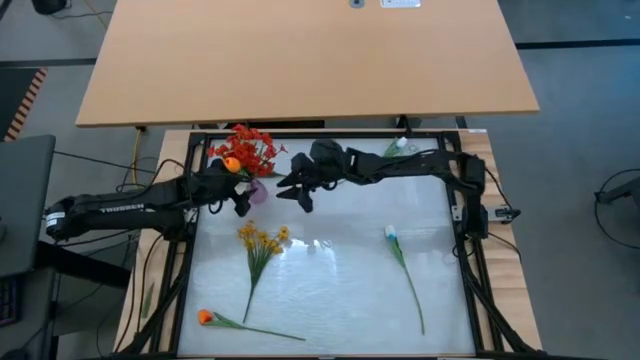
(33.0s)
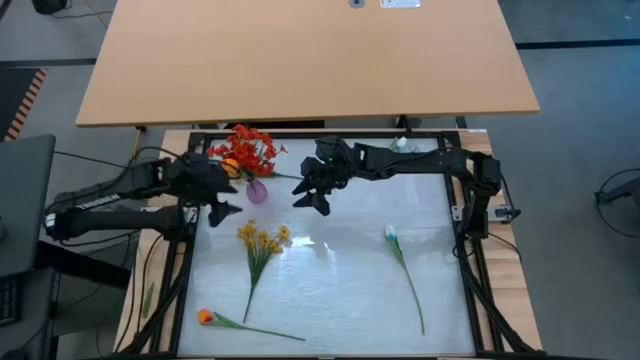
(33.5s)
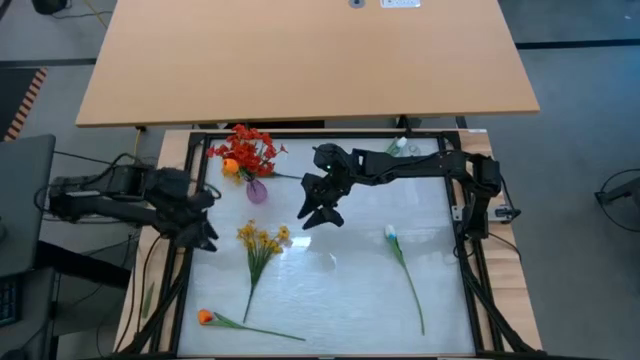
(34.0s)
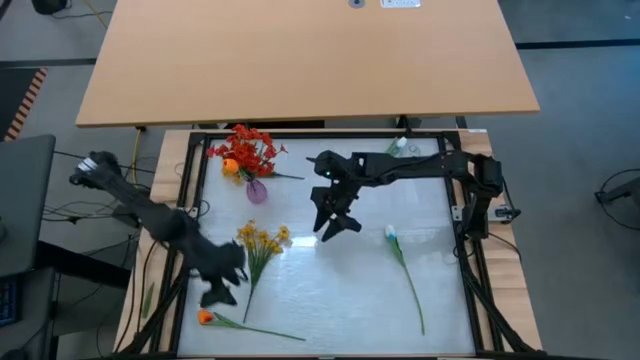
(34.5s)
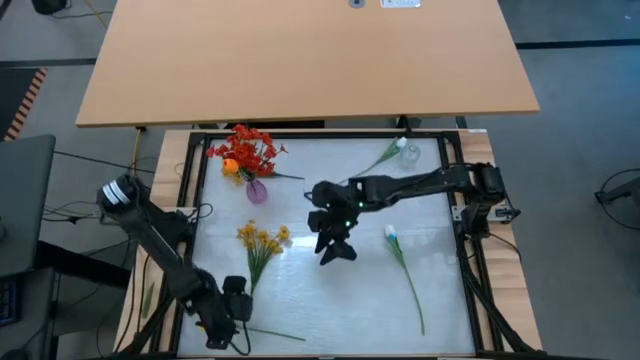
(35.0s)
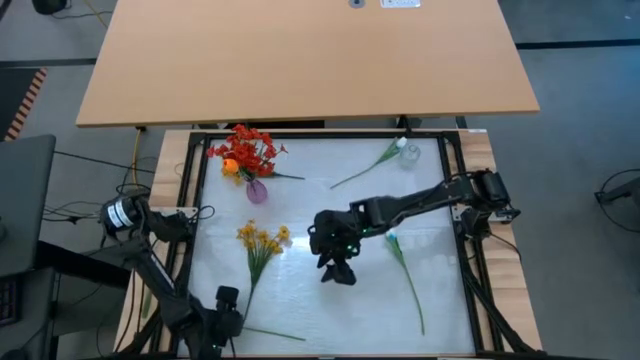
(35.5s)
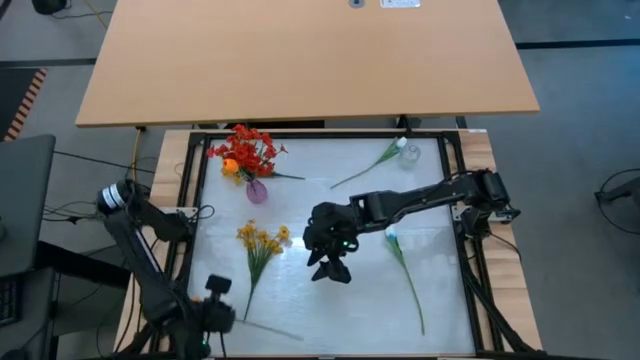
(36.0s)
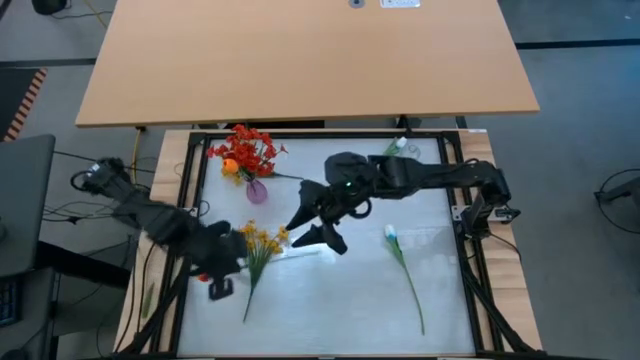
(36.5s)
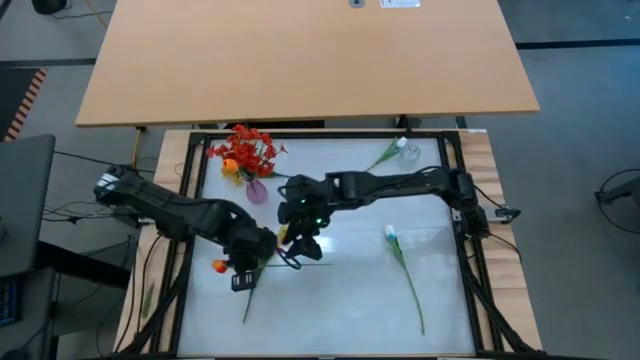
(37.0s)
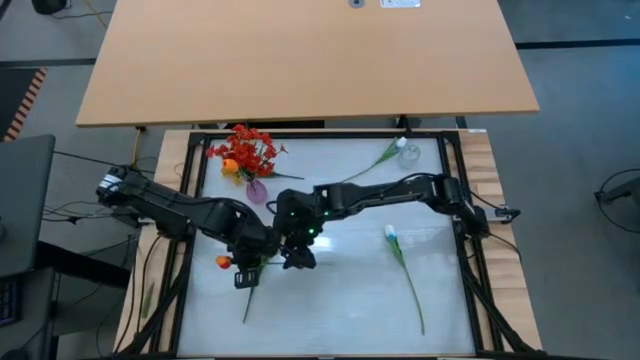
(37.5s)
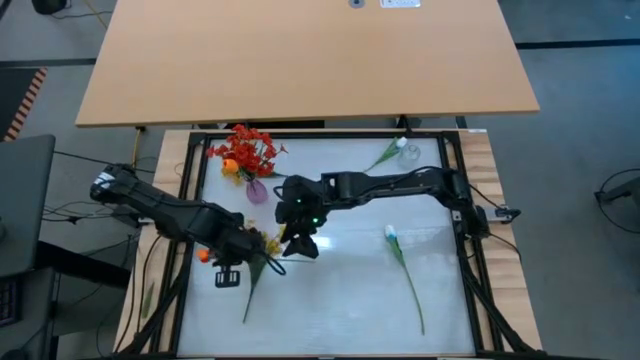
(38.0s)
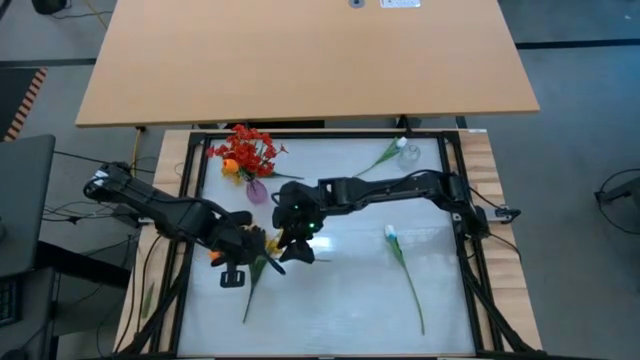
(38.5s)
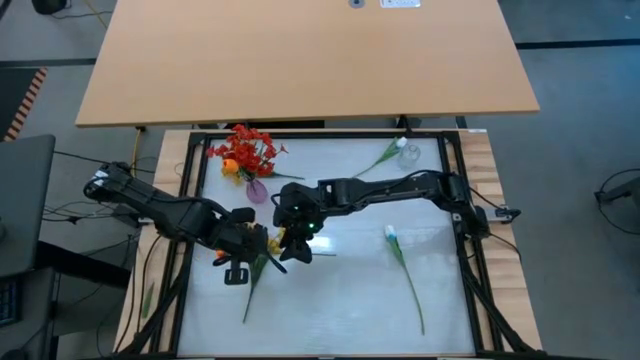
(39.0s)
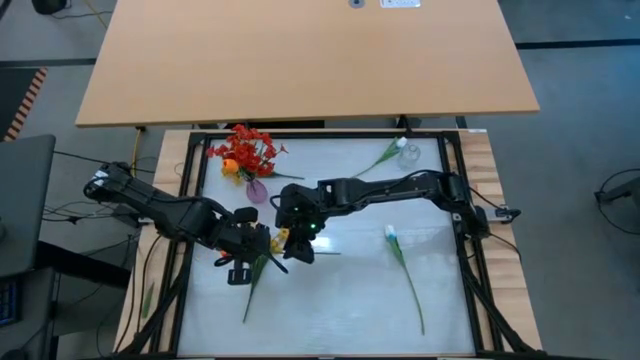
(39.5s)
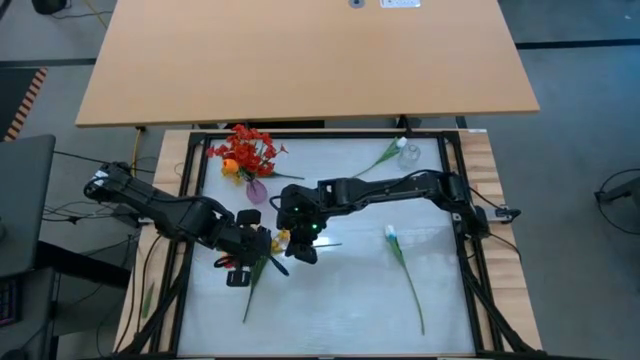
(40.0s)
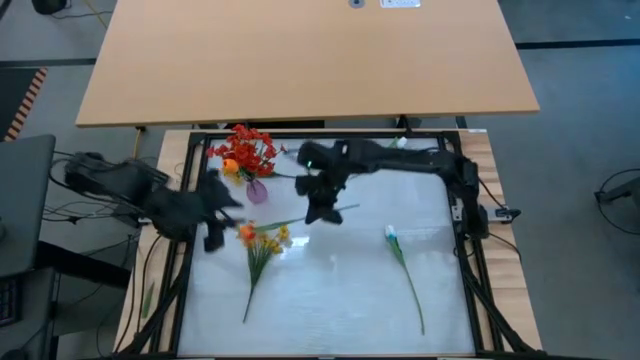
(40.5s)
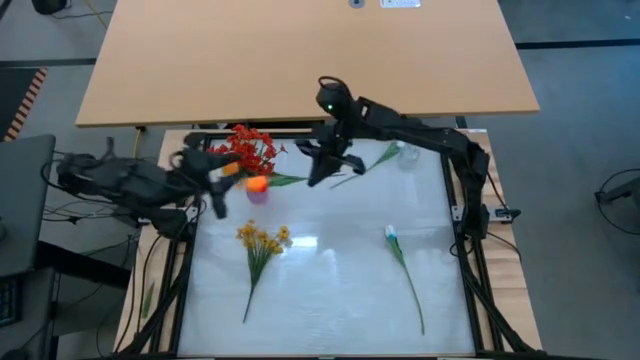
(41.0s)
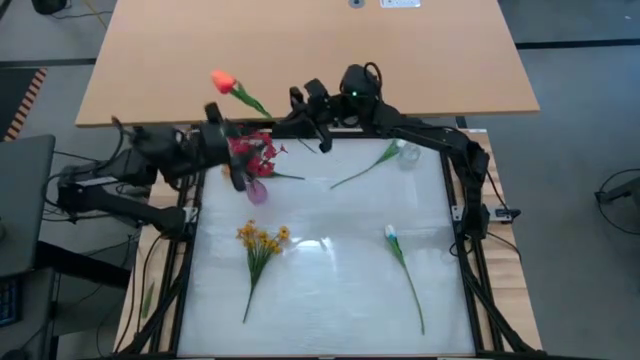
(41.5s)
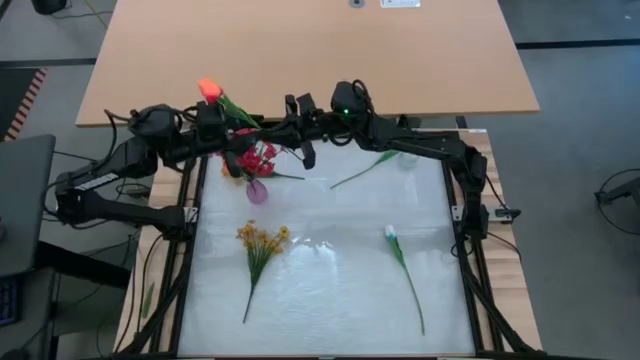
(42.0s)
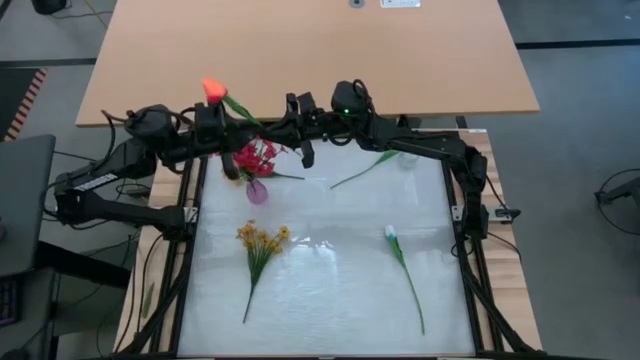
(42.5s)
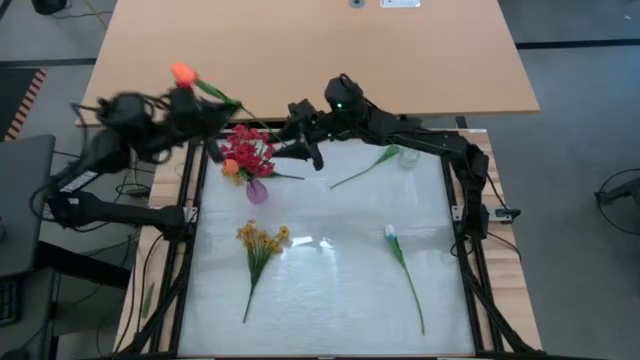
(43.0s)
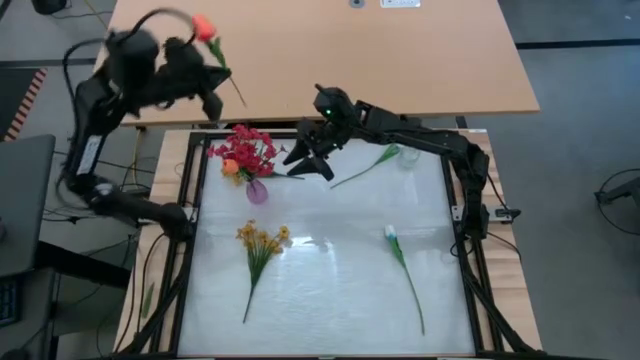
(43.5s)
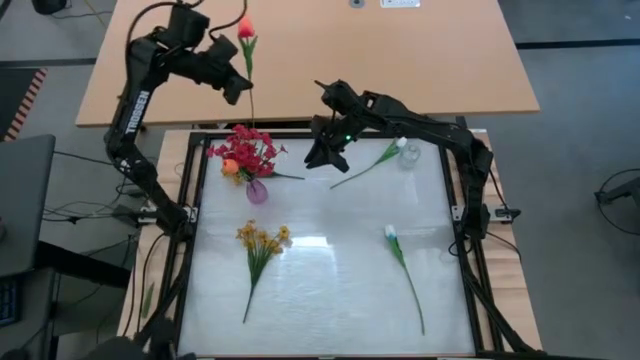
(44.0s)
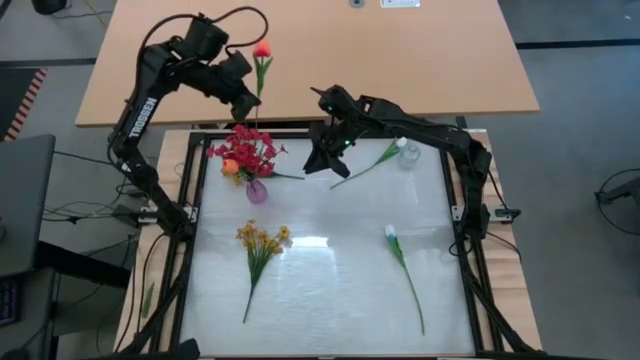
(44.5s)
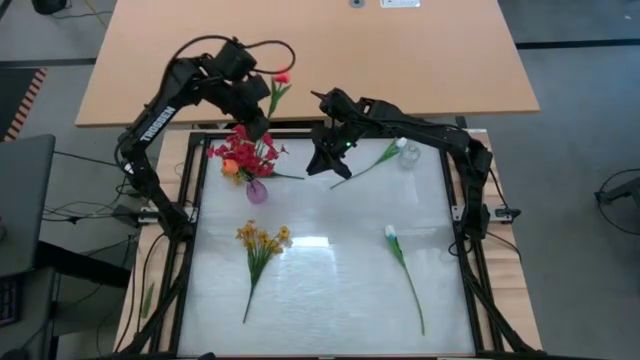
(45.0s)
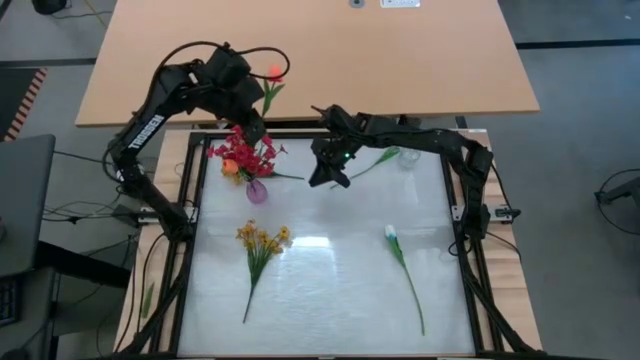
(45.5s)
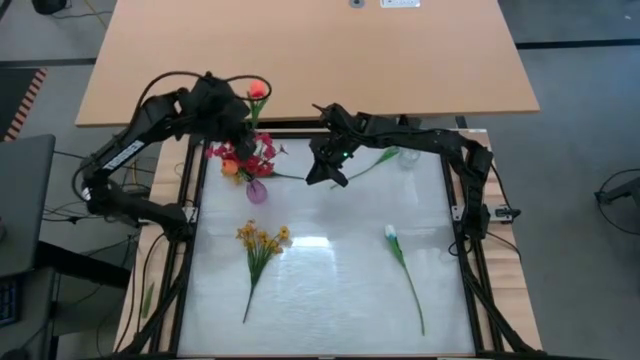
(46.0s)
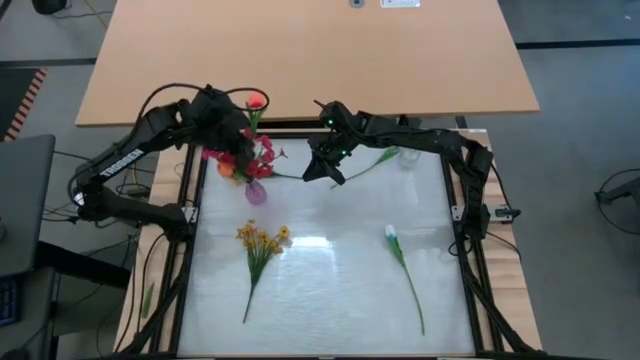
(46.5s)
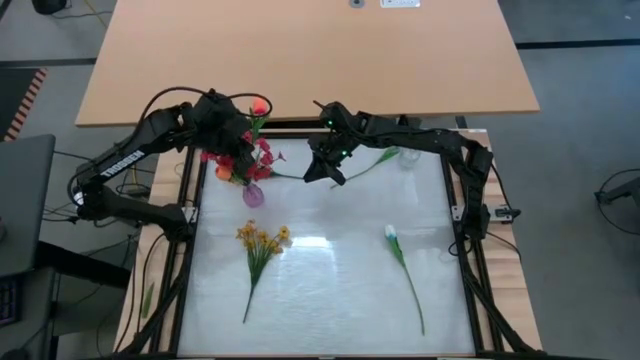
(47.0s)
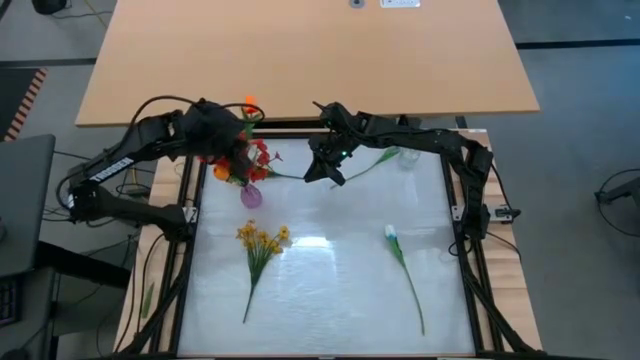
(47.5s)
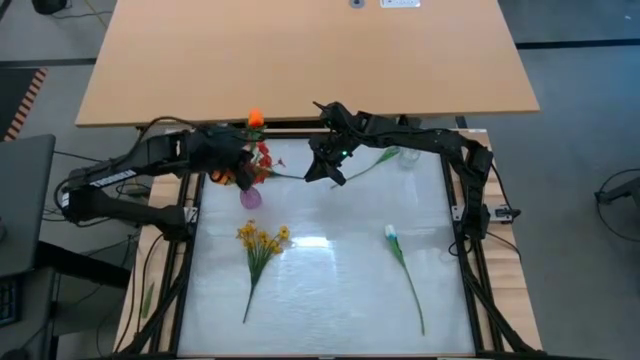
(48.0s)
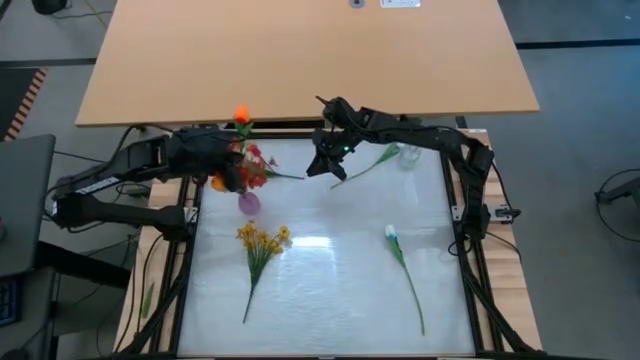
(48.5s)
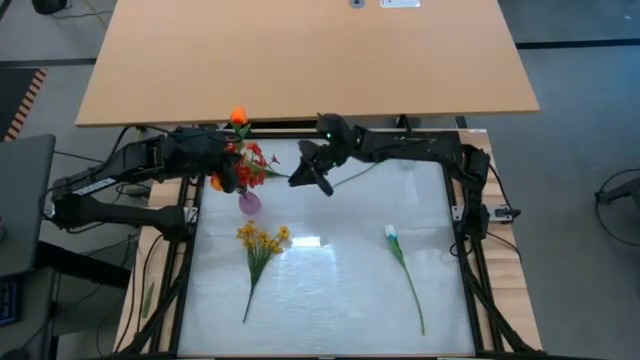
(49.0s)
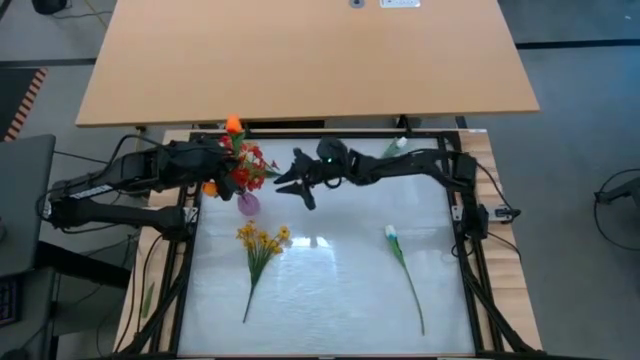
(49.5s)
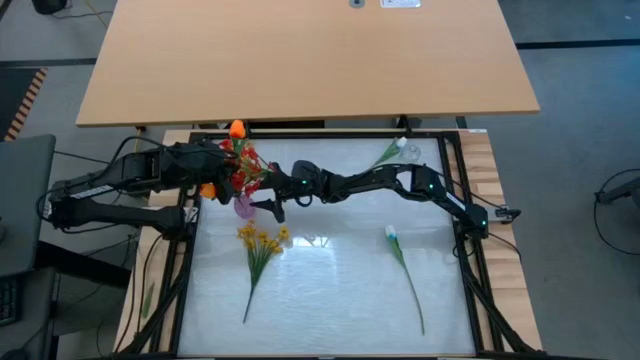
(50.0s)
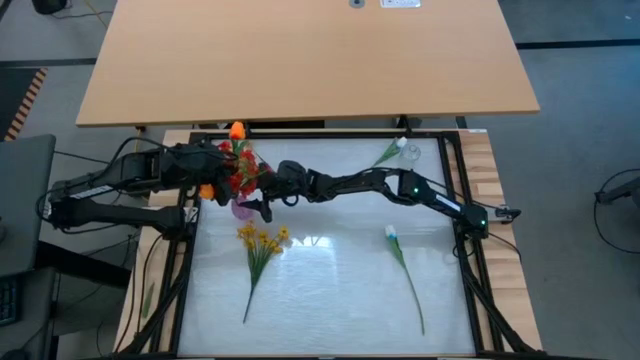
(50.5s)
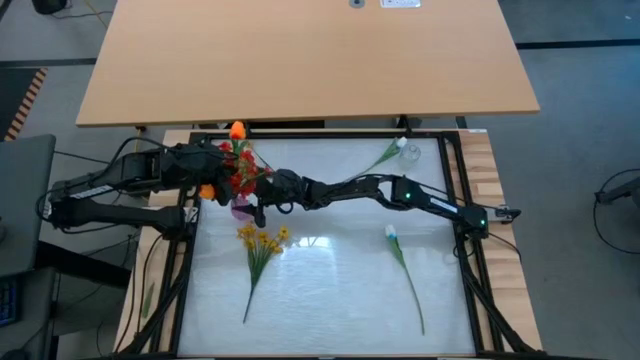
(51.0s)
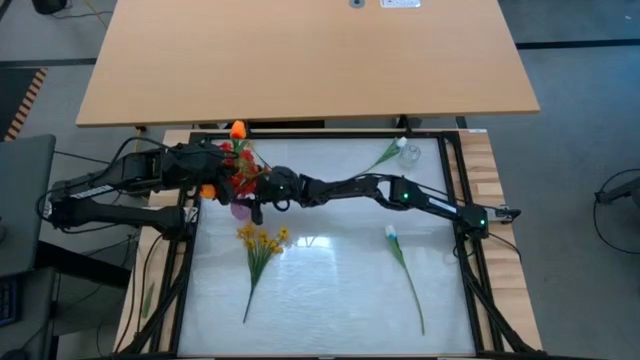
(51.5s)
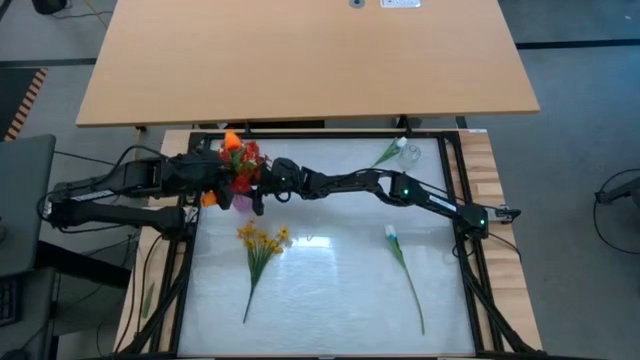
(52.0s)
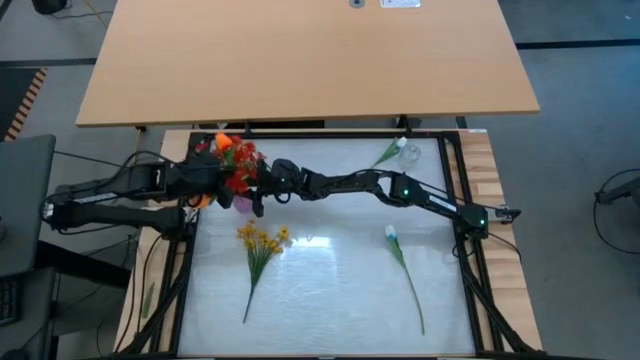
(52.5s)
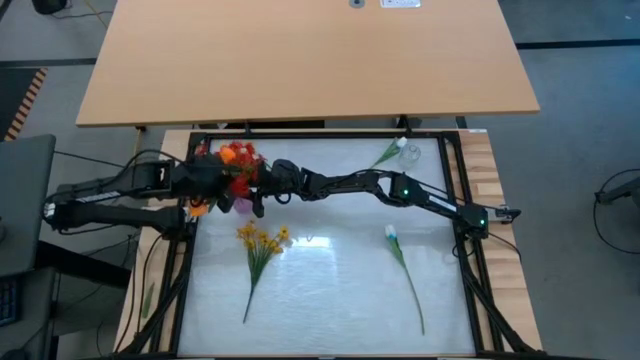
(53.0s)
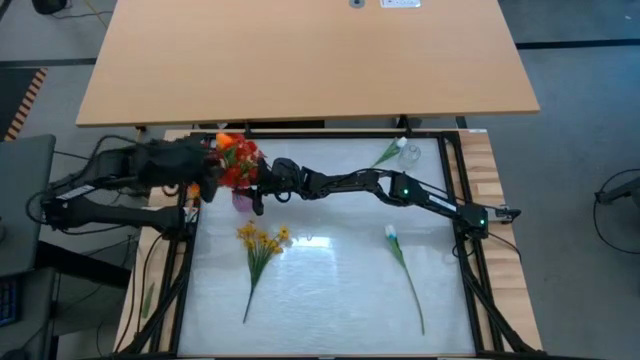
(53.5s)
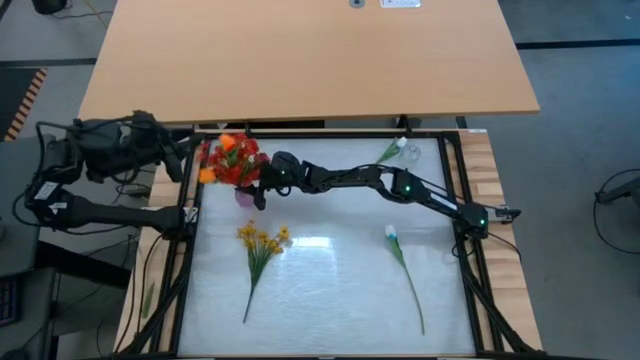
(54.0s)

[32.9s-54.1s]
Task: Sort flowers into vase by color
Put the orange tulip into the purple vase

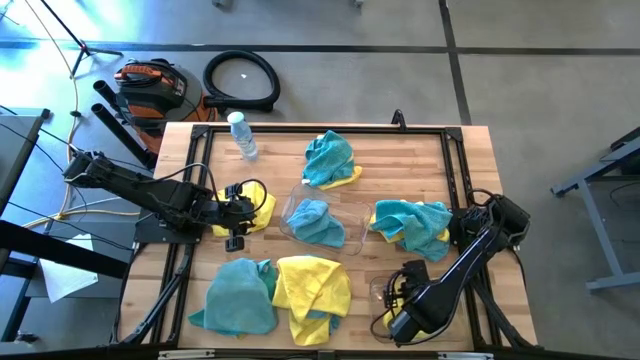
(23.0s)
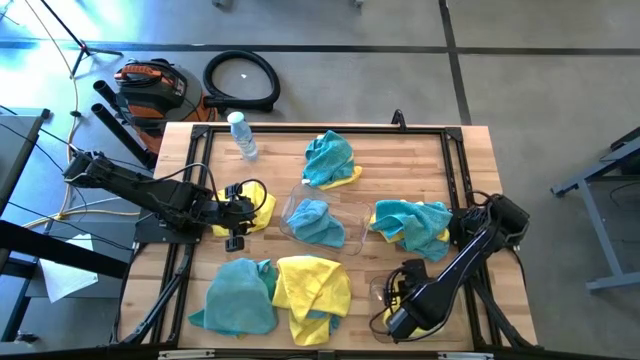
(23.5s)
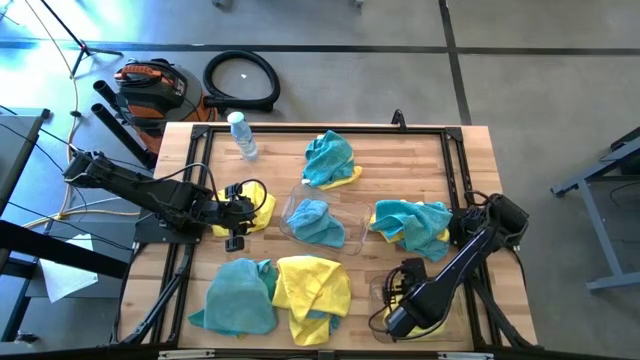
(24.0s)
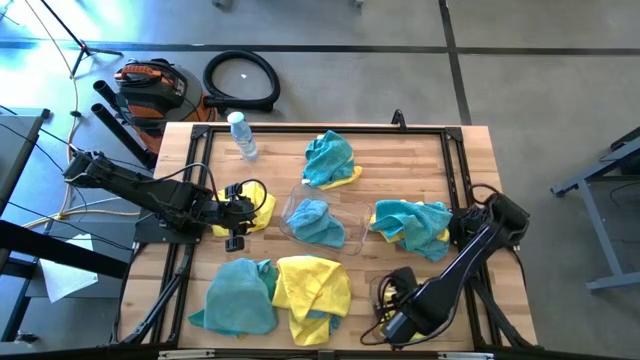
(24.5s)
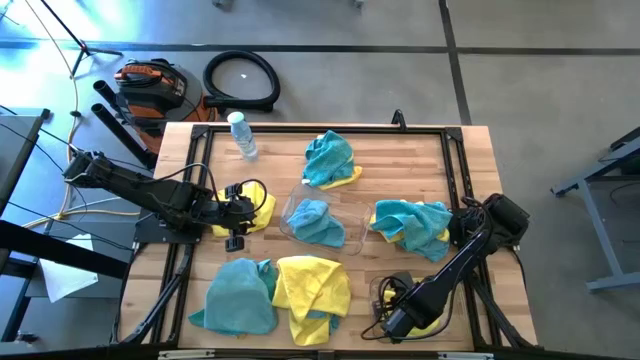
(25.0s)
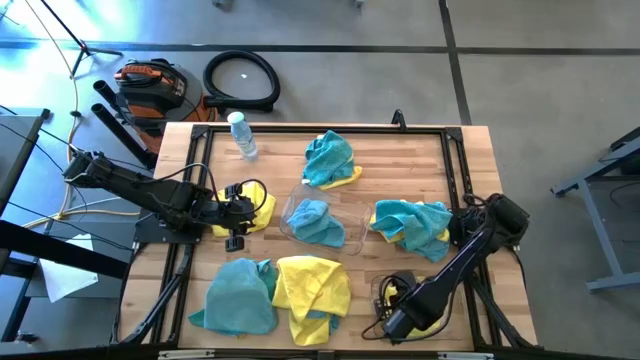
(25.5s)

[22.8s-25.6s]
Task: Sort microfiber towel by color & place in baskets
Put the yellow towel in the bottom transparent bin
